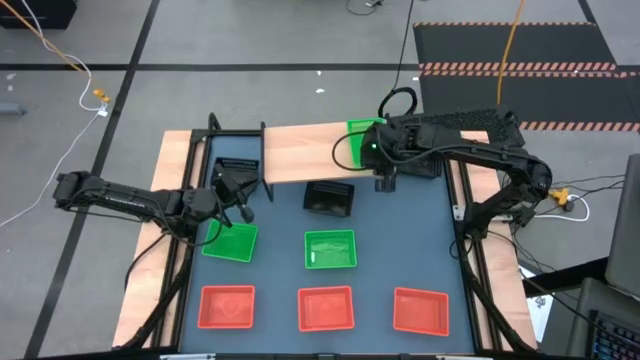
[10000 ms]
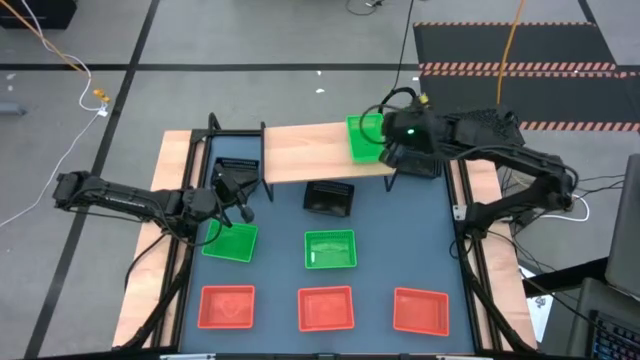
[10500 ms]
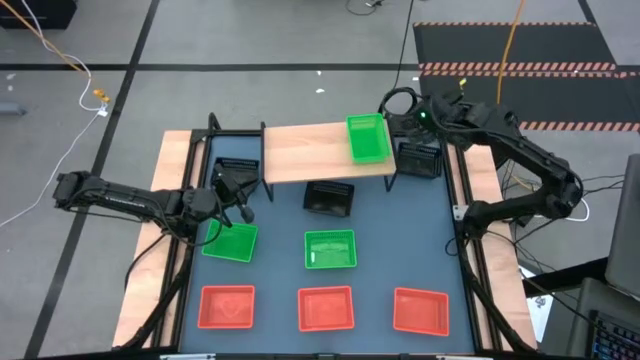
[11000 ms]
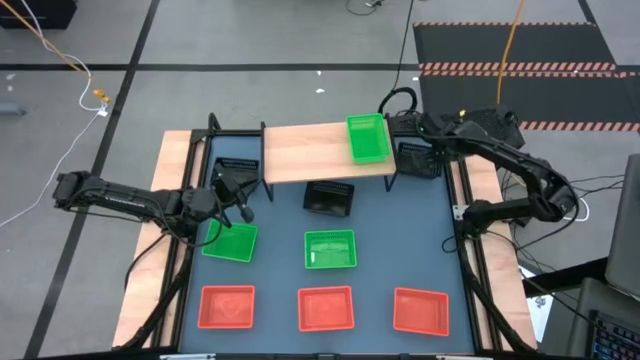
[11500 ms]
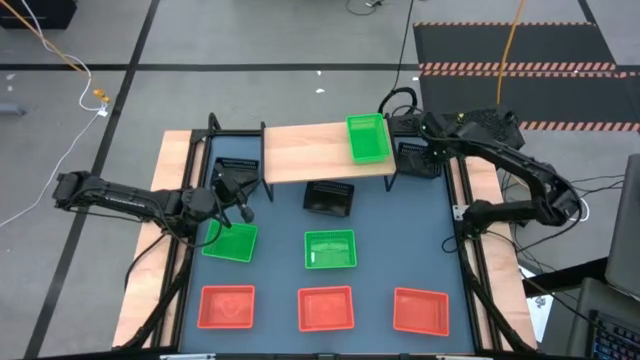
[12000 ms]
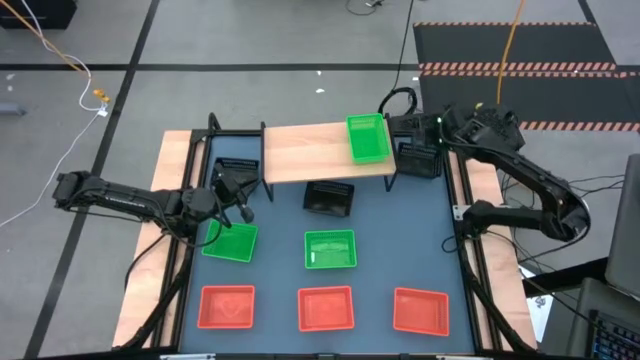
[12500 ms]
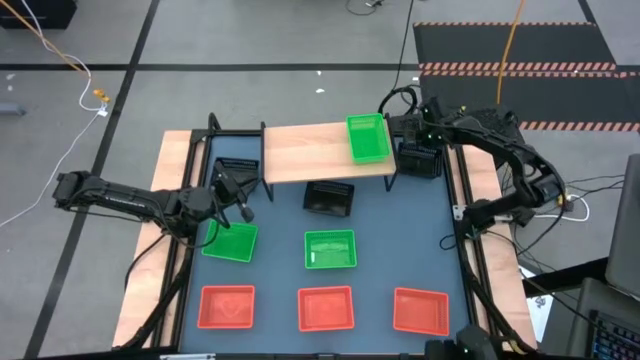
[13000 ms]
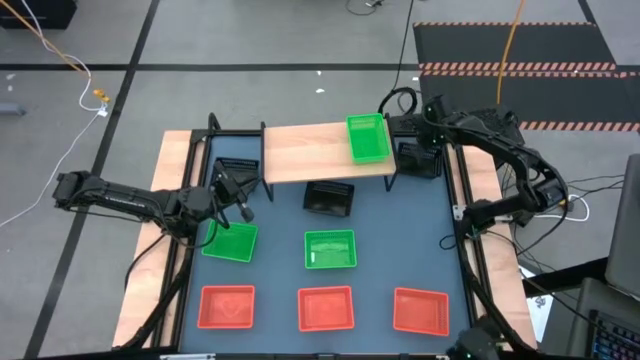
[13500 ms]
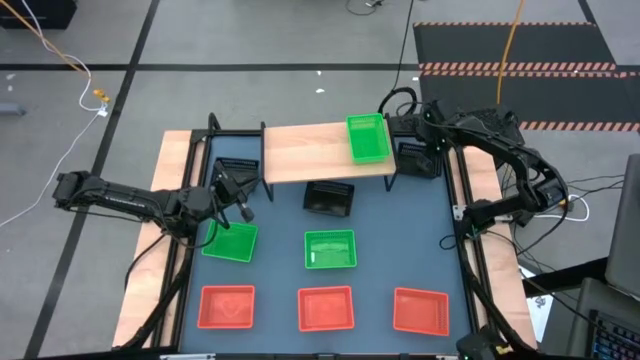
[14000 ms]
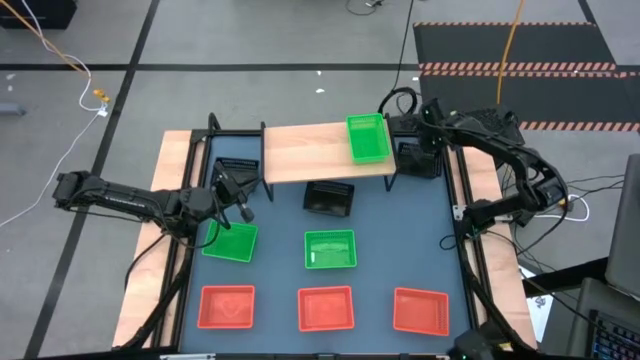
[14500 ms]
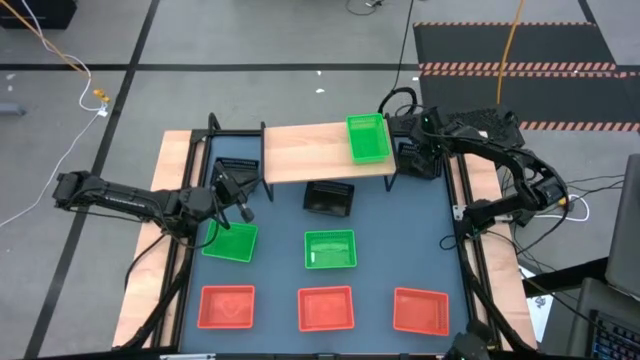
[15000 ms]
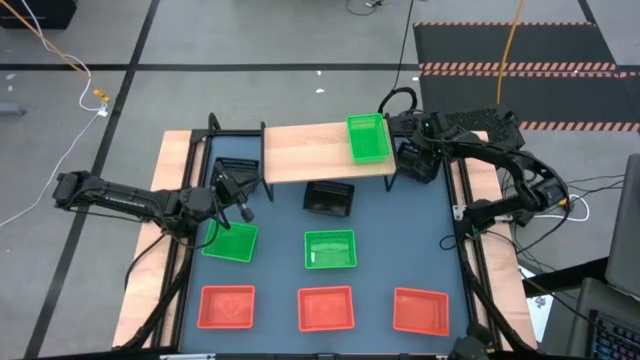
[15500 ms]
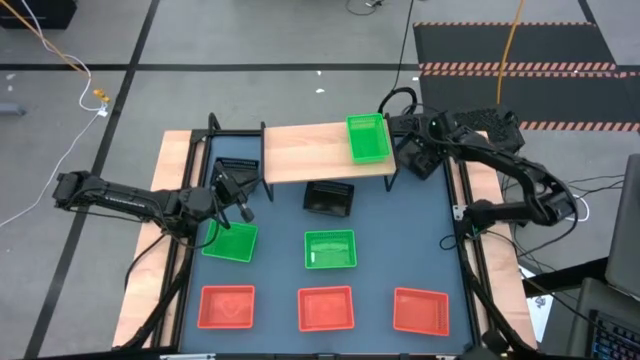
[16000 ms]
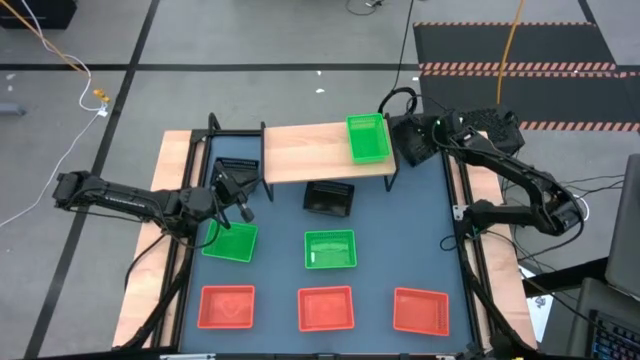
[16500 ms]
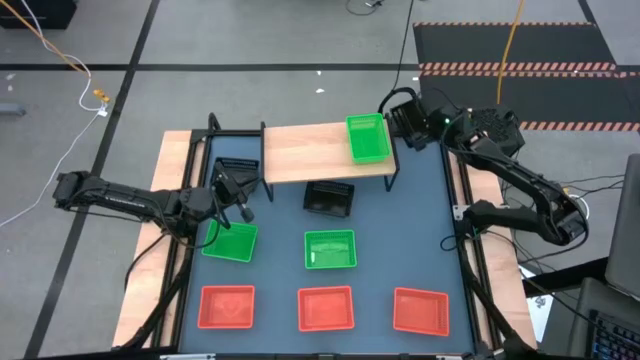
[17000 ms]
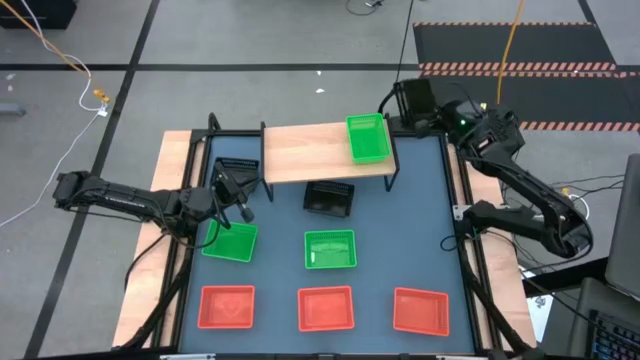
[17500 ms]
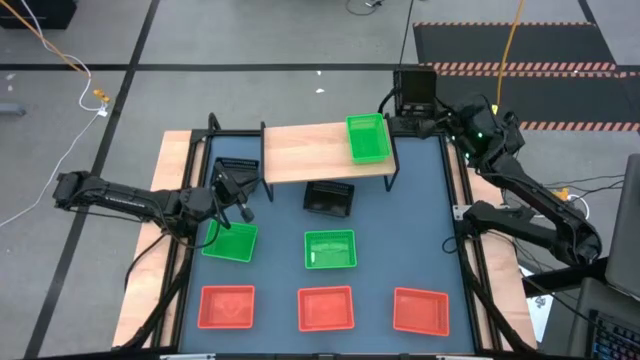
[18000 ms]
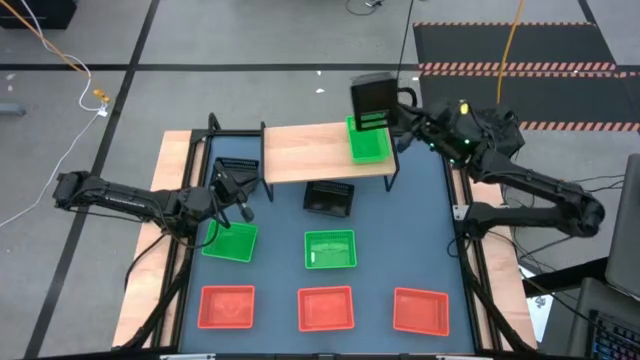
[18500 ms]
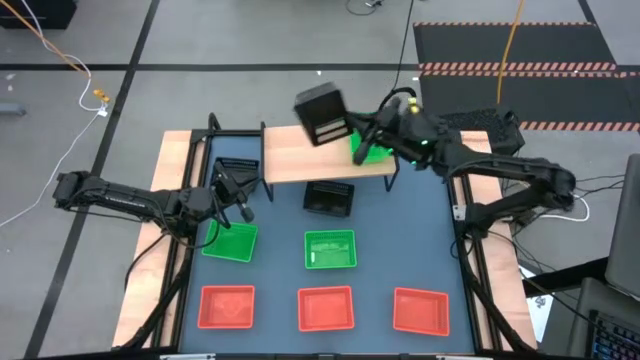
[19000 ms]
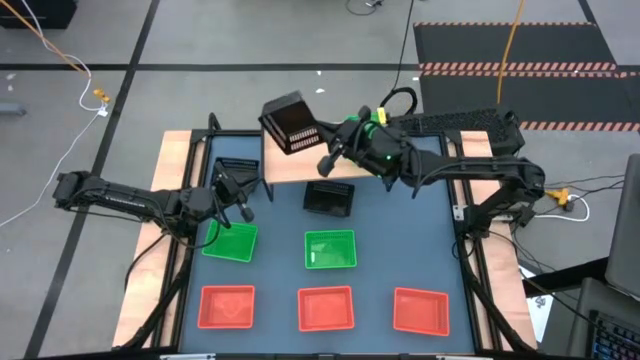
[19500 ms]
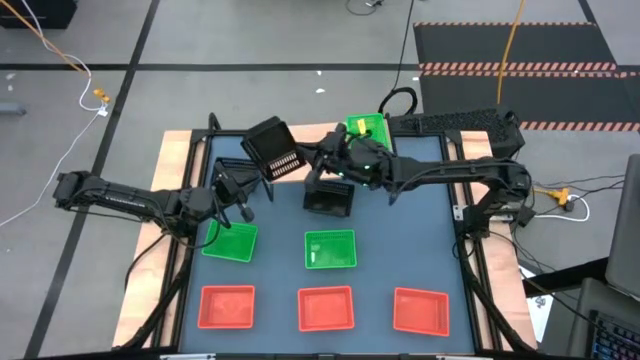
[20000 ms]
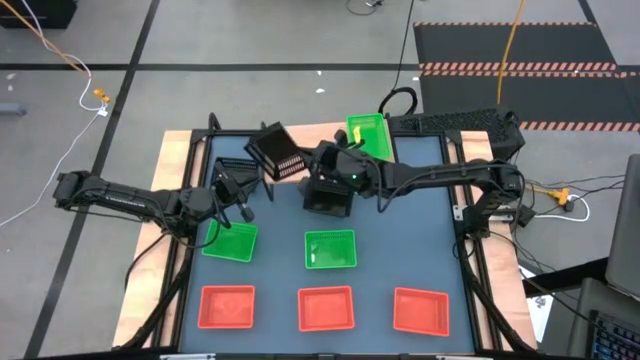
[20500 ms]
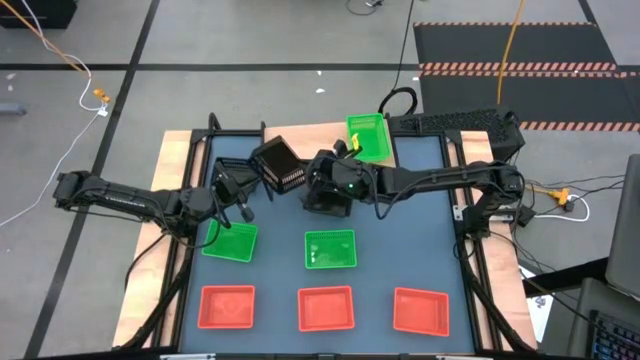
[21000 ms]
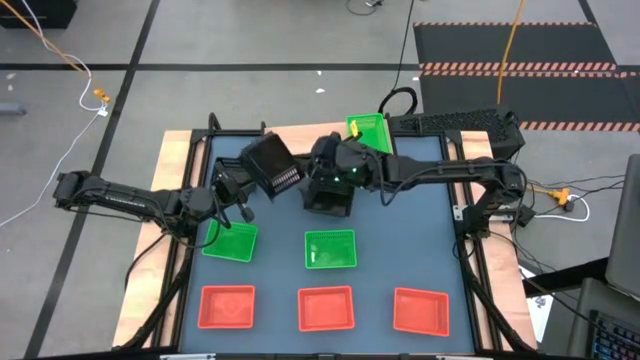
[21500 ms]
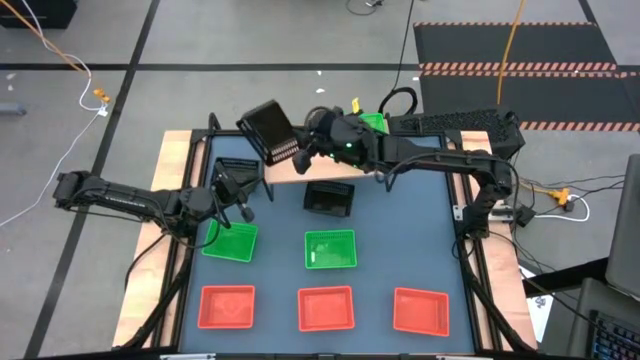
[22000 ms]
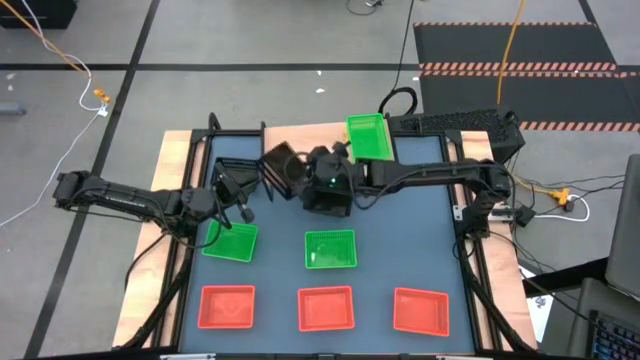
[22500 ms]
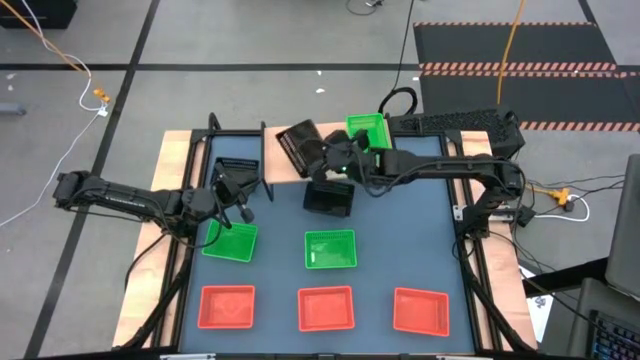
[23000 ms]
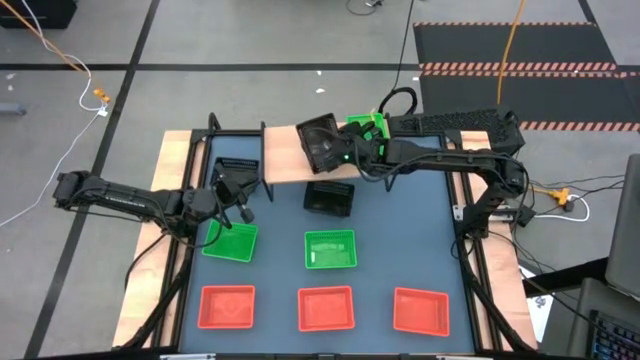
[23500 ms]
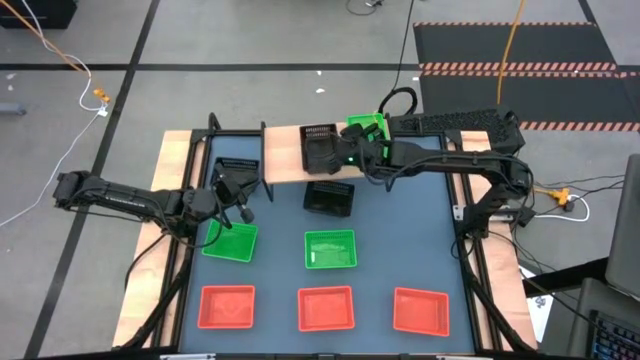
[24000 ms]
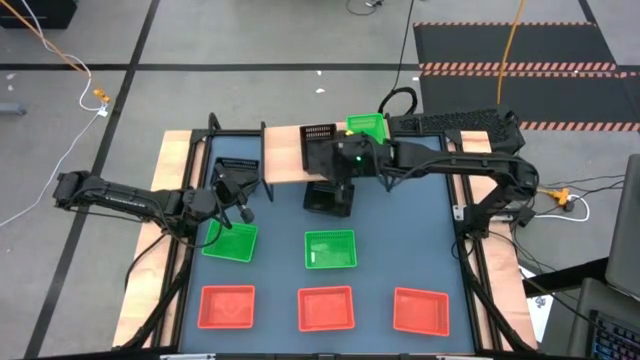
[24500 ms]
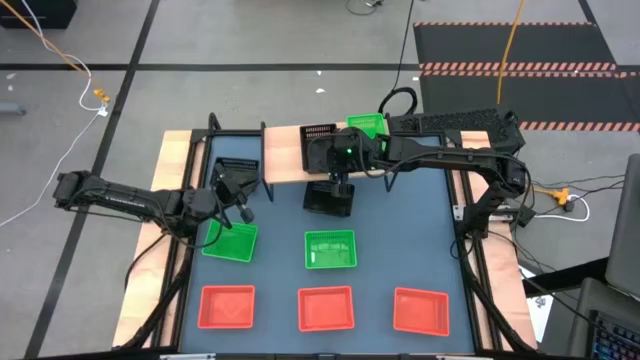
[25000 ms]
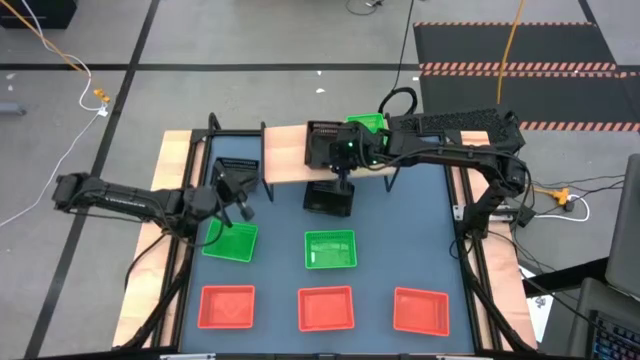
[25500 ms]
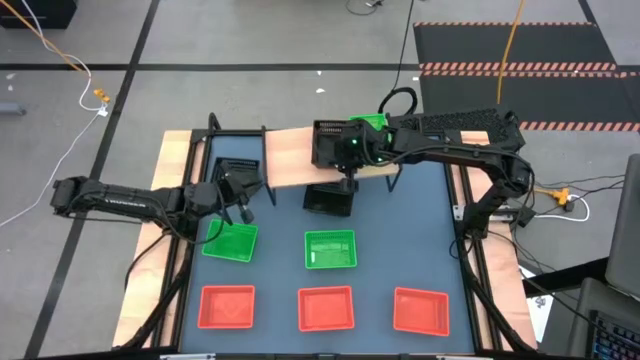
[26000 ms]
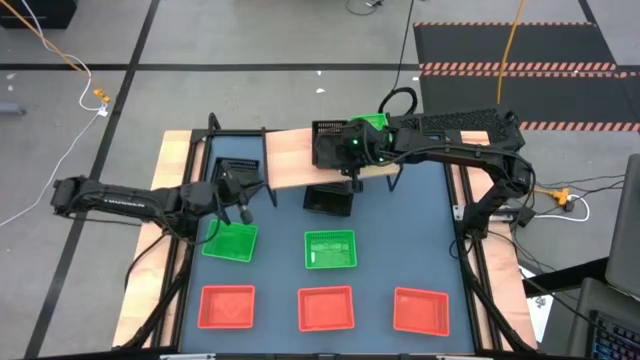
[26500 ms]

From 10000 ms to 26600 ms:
Task: Stack baskets on shelf by color
Put the top right black bin on the shelf

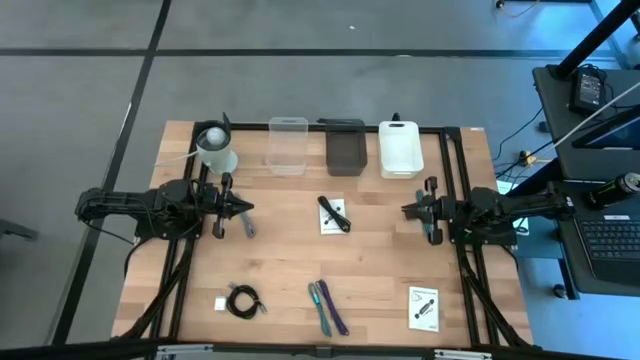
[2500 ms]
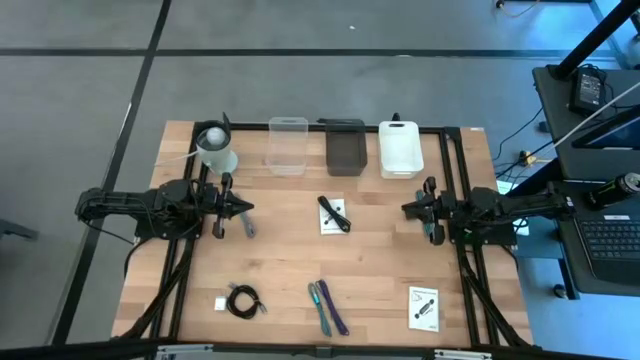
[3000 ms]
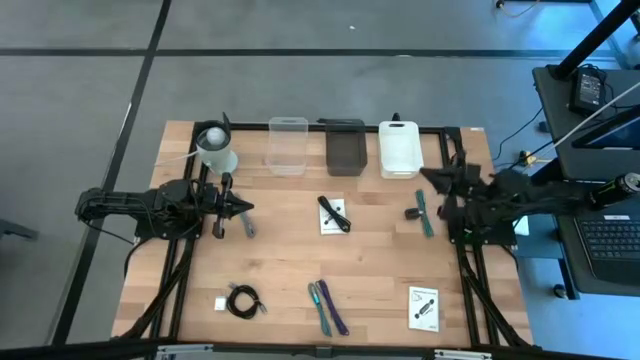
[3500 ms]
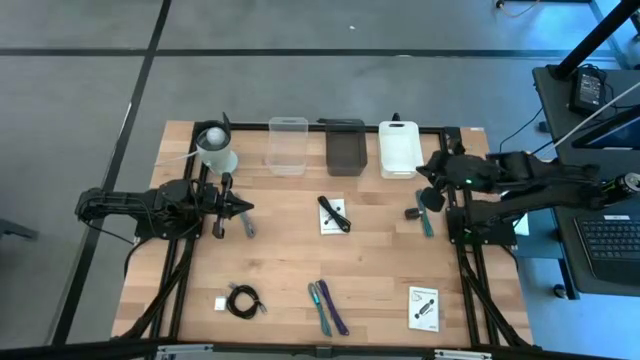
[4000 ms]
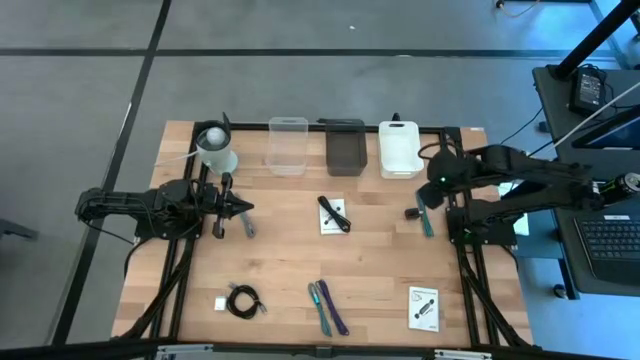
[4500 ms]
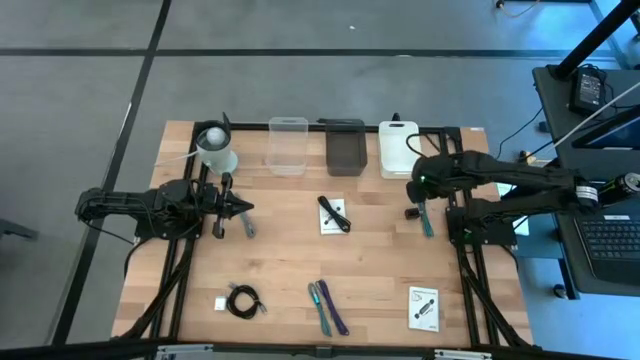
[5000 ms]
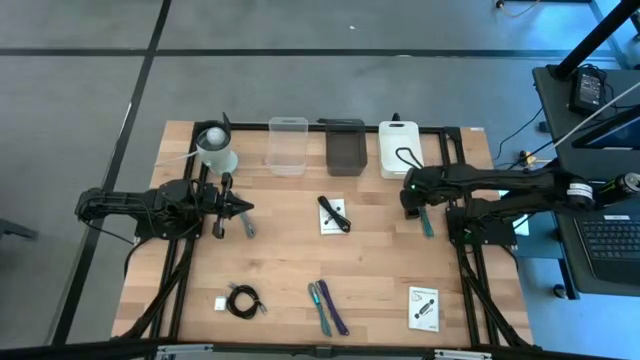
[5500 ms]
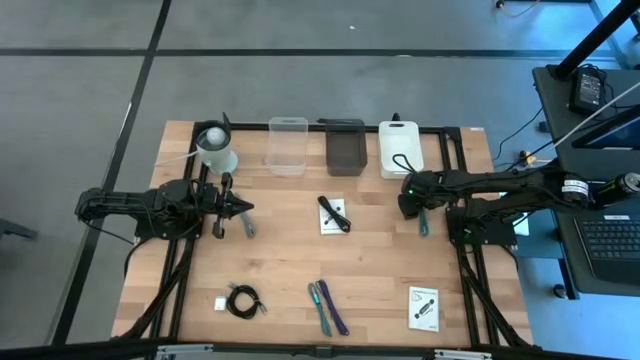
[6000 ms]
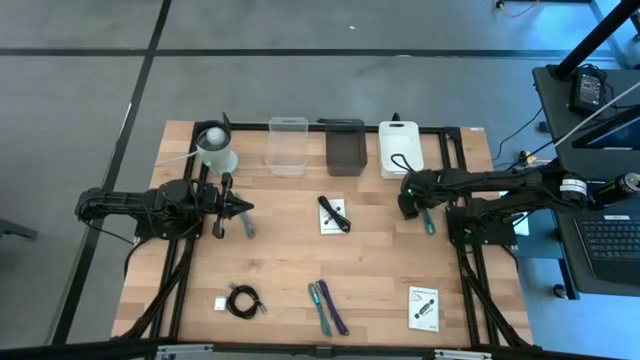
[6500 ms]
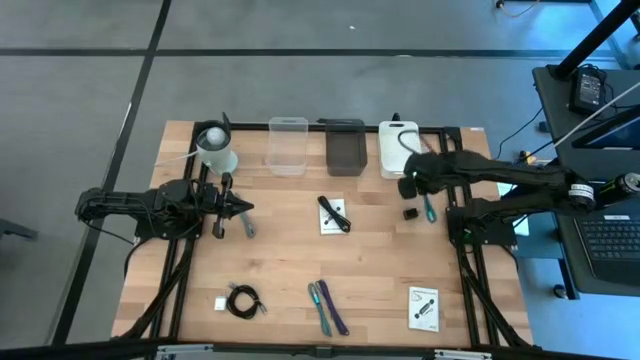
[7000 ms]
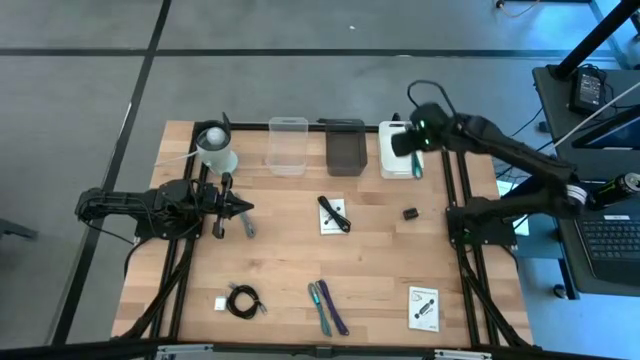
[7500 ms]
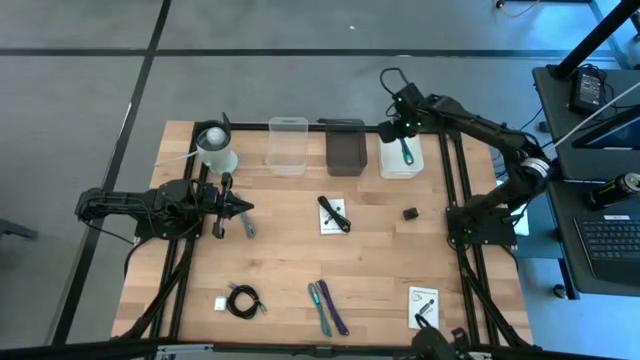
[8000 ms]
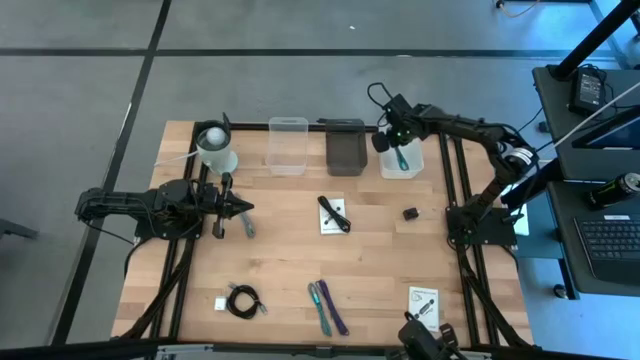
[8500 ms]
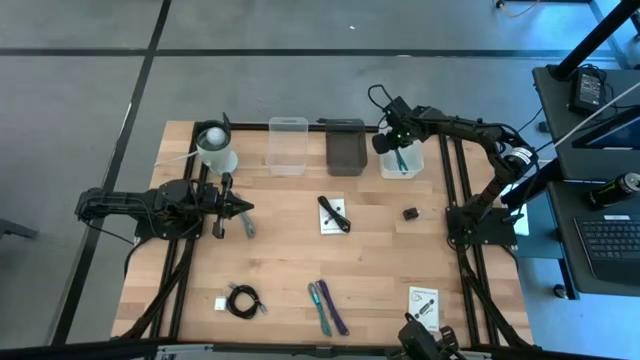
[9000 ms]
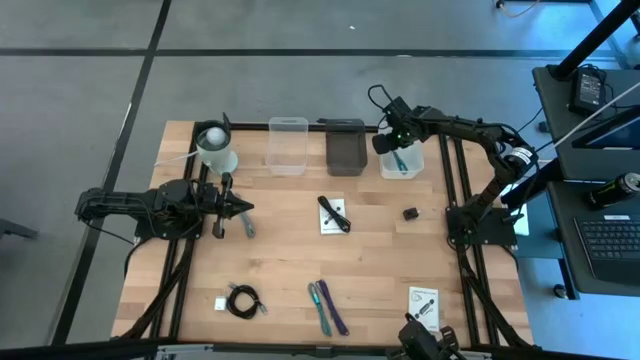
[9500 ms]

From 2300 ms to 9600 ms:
Task: Pick and place items into bin
Put the top light blue charger cable into the white bin
